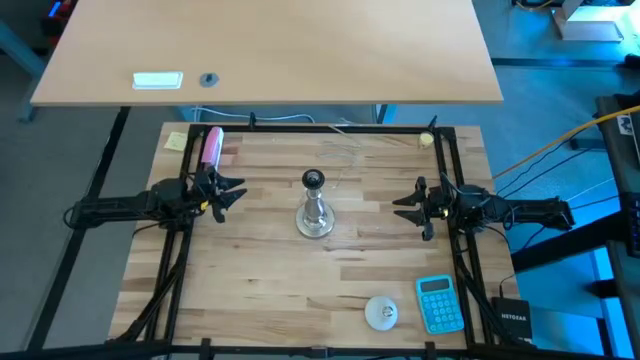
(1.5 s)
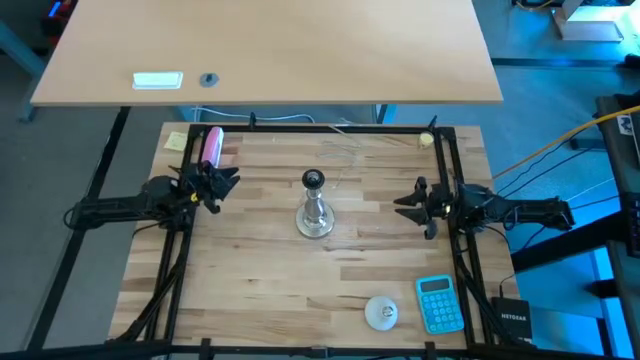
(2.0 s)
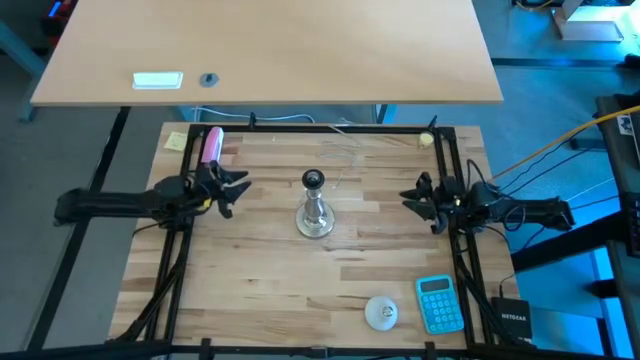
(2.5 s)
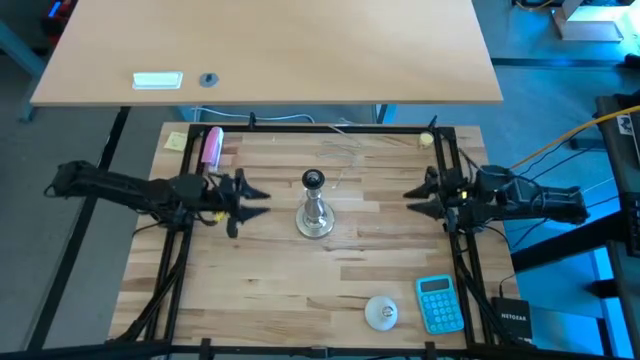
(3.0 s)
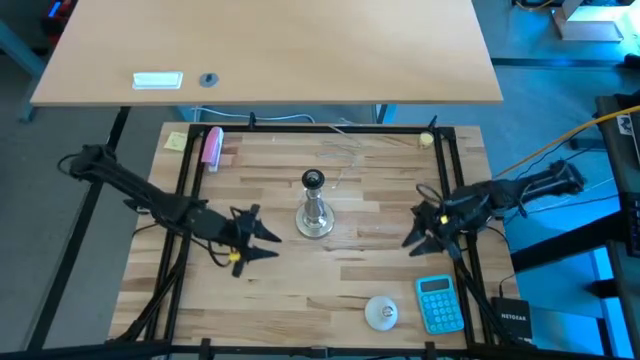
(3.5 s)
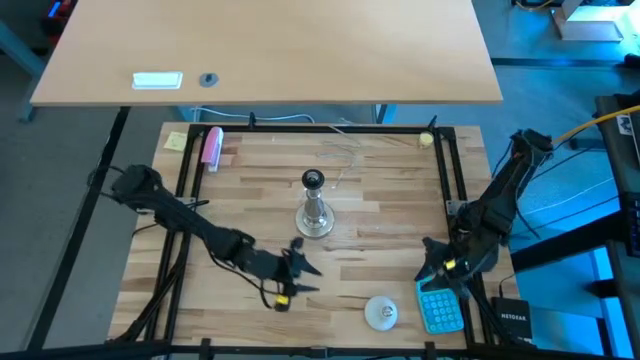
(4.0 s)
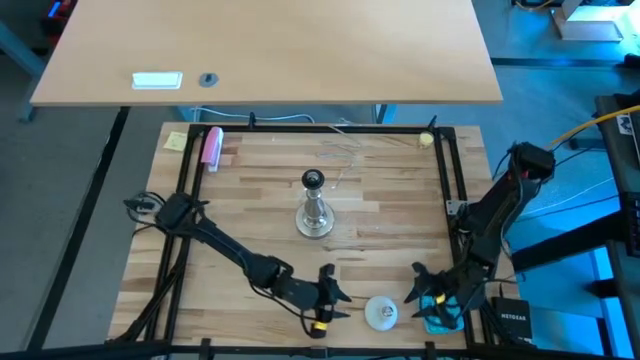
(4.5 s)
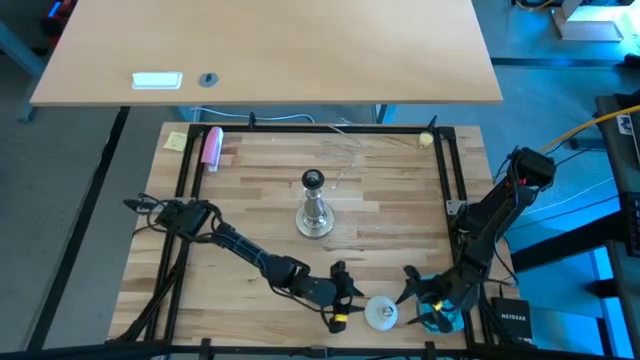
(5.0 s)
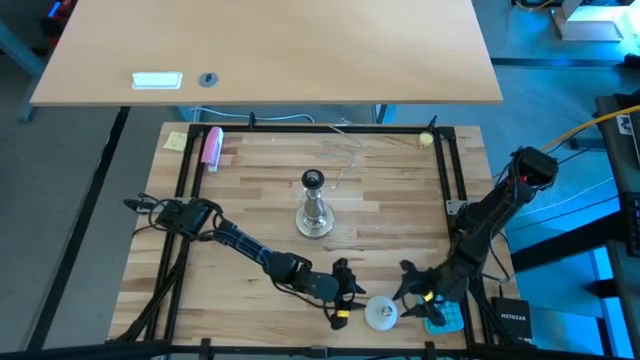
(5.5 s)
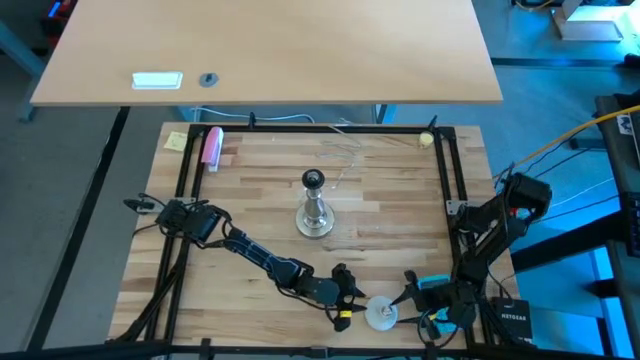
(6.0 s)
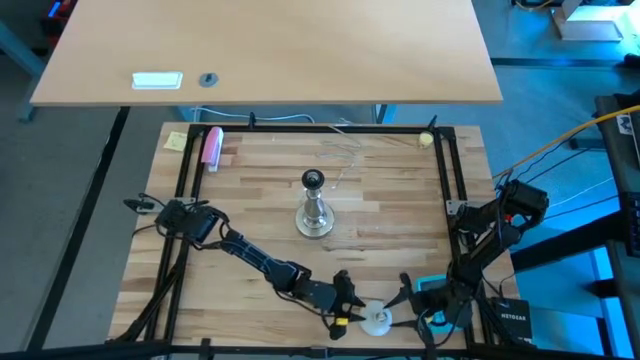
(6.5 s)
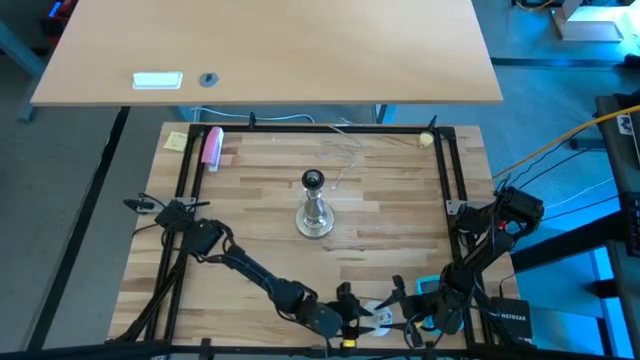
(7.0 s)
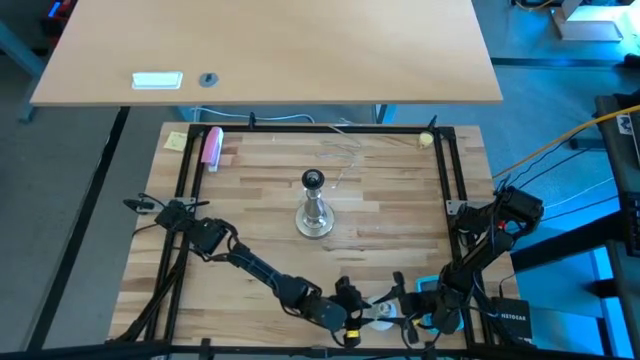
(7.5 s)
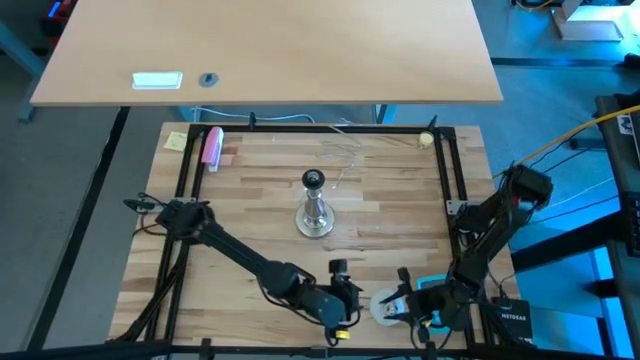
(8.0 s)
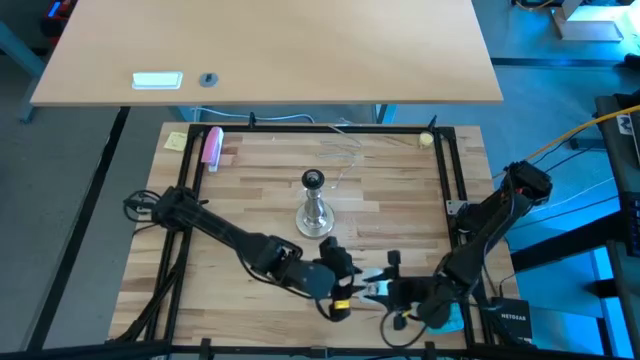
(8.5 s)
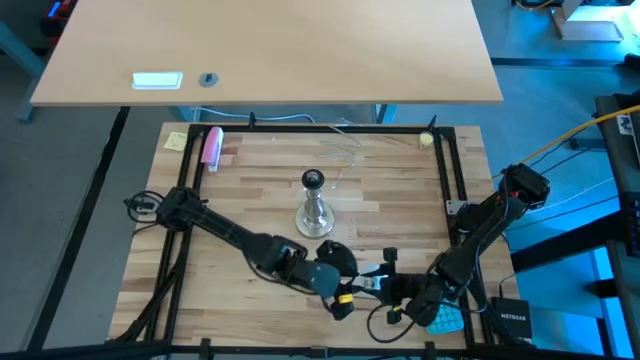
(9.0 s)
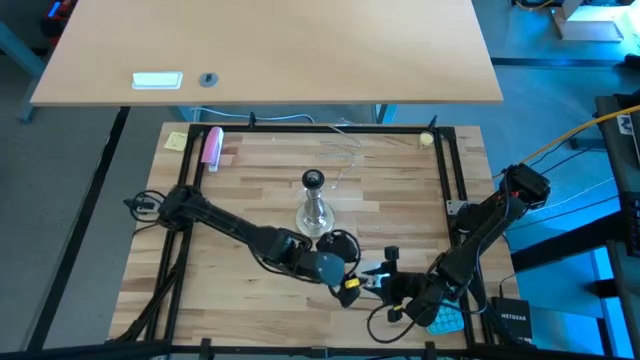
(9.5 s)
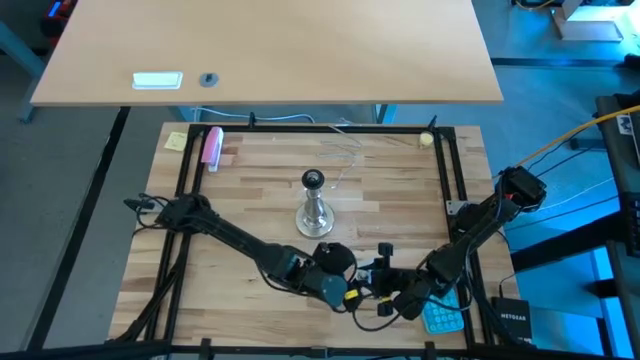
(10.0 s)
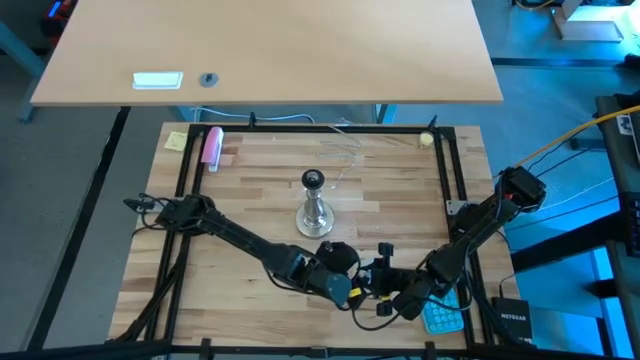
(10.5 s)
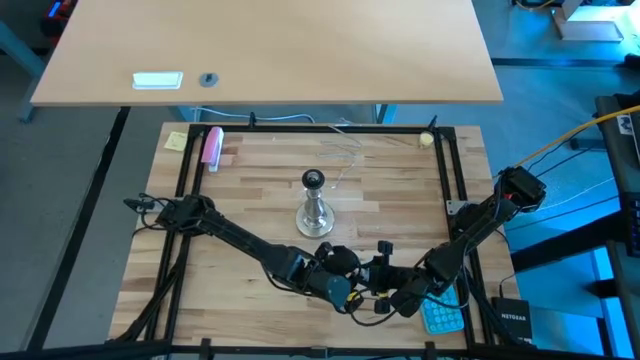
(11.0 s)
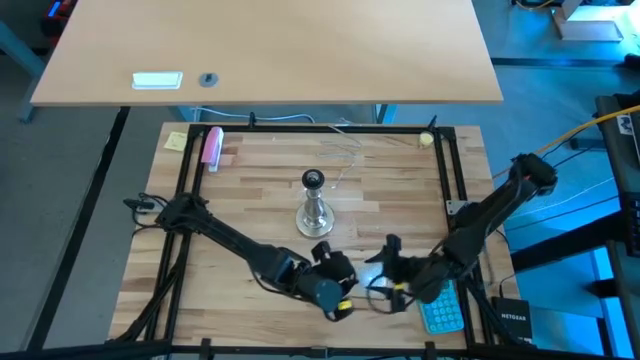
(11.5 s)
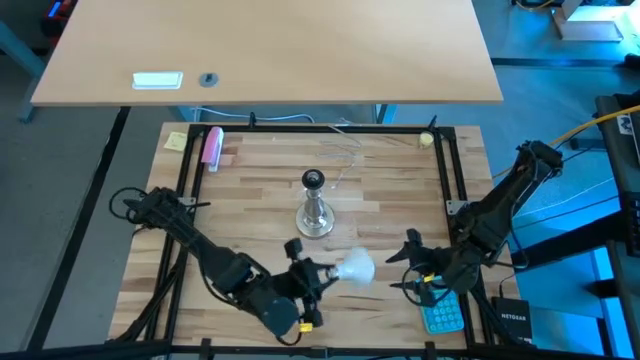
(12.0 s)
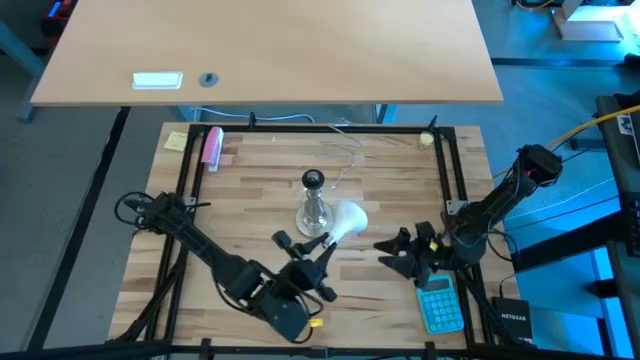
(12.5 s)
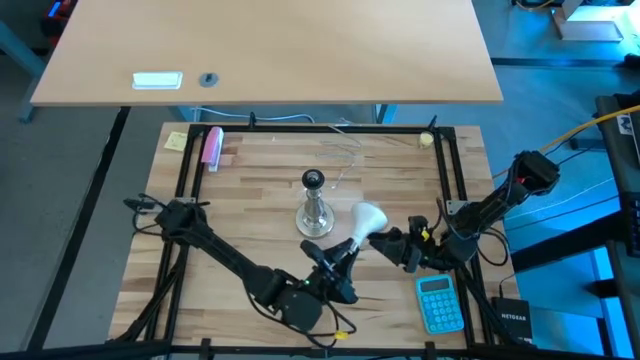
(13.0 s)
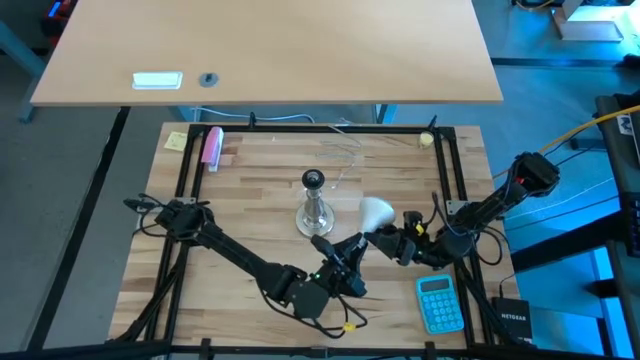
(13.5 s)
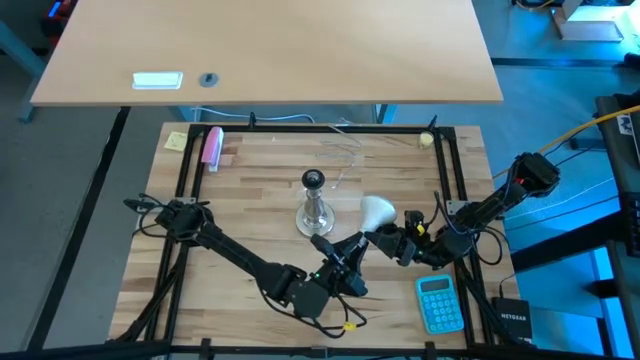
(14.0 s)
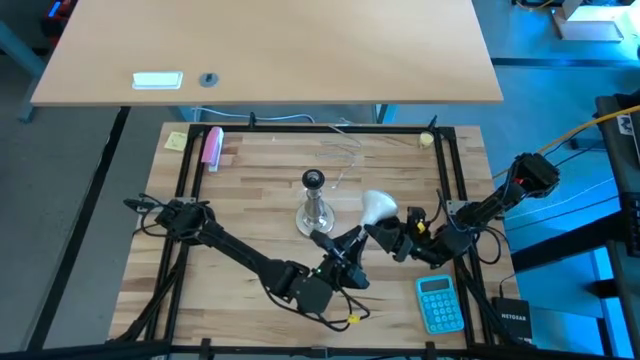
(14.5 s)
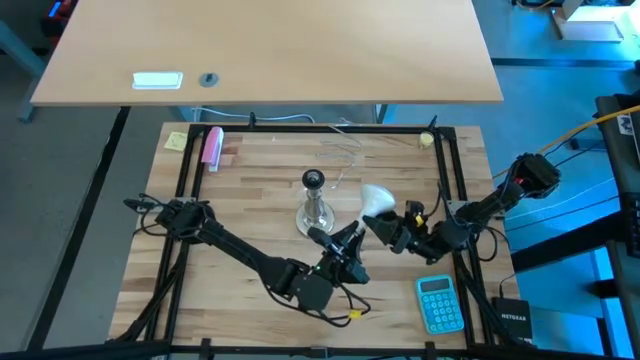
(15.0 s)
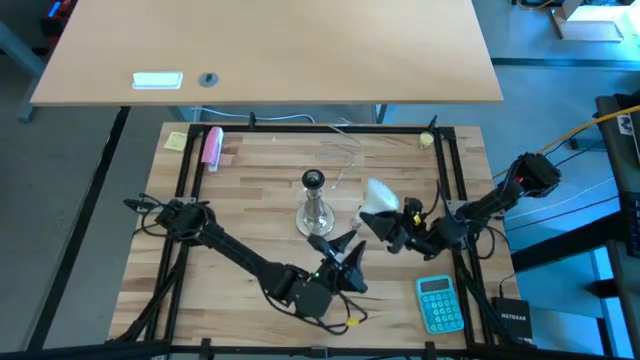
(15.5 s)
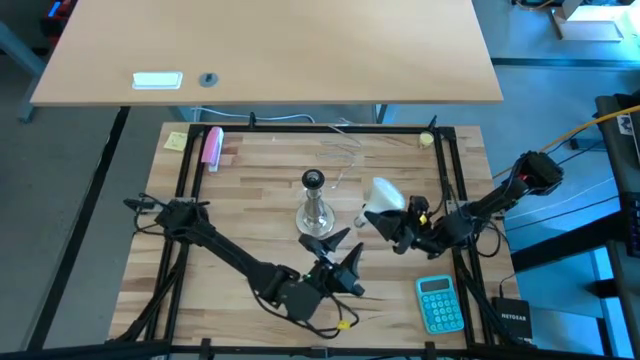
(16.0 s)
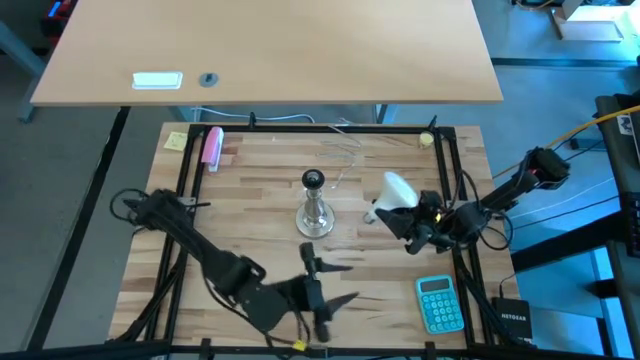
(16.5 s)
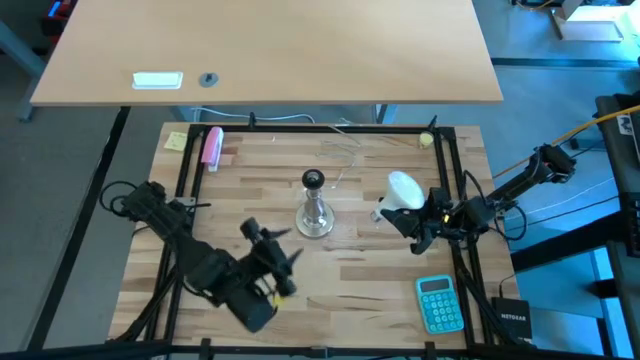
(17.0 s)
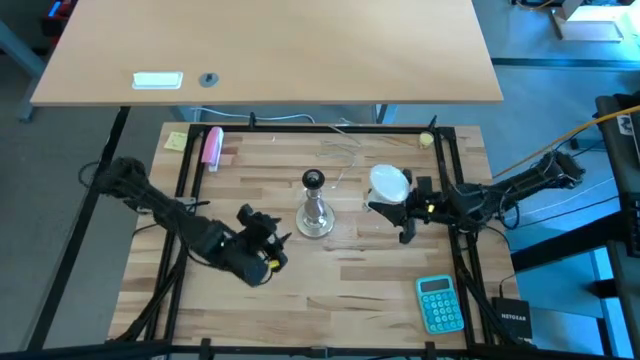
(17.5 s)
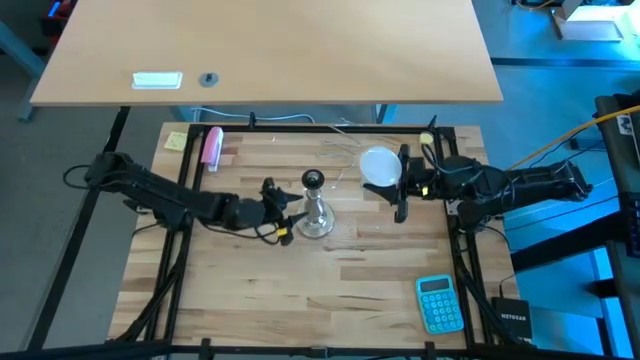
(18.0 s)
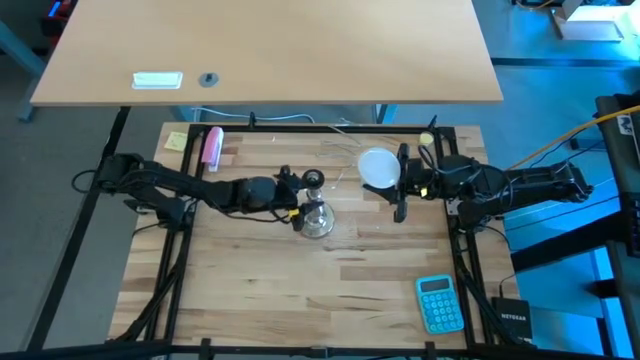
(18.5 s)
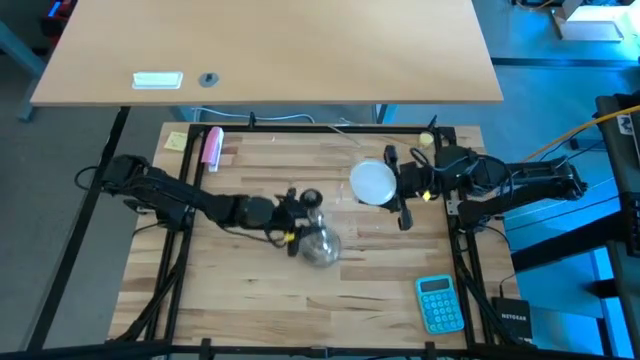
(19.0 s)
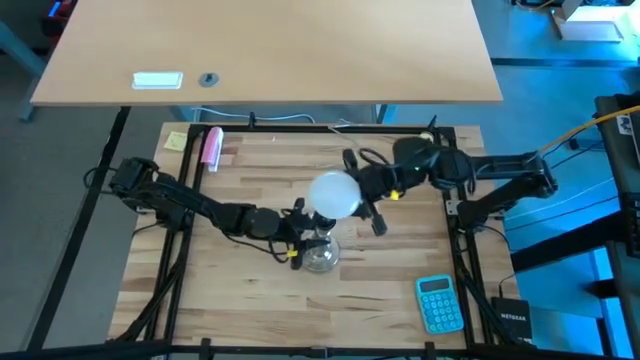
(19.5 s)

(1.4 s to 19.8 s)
Task: Screw lightbulb
Insert the light bulb into the lamp
